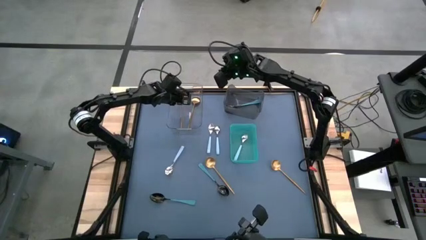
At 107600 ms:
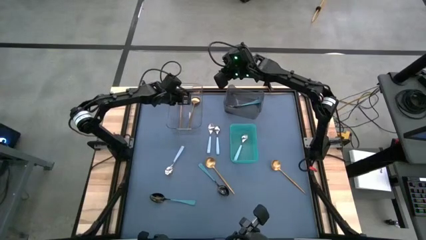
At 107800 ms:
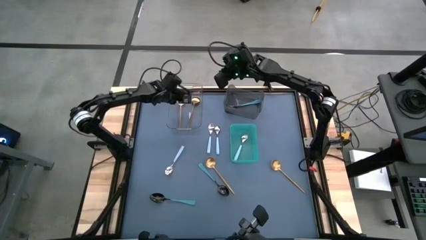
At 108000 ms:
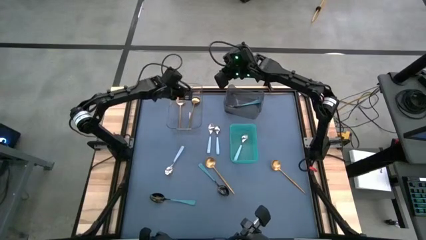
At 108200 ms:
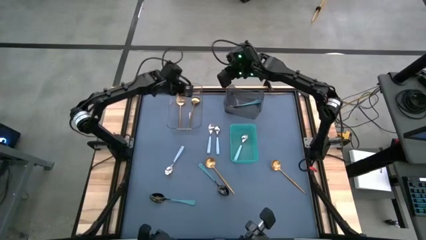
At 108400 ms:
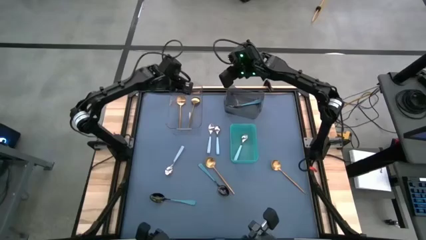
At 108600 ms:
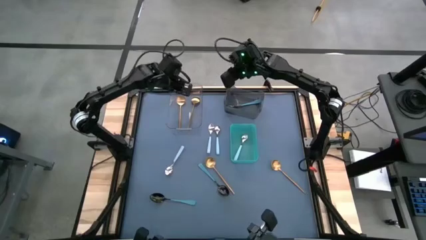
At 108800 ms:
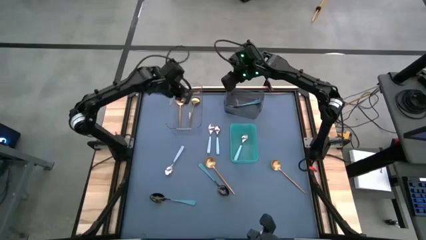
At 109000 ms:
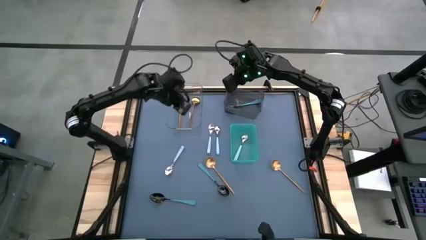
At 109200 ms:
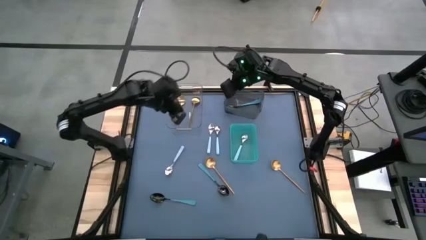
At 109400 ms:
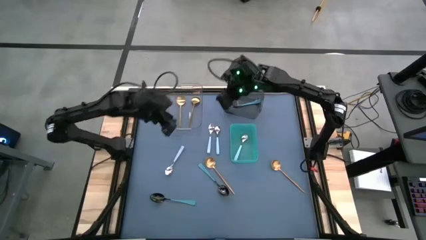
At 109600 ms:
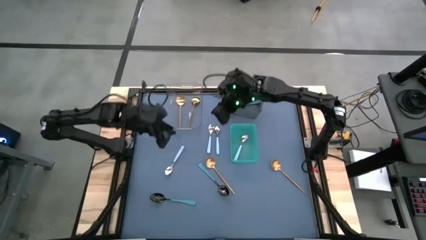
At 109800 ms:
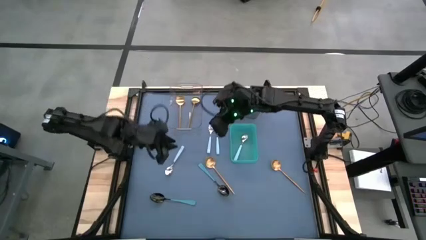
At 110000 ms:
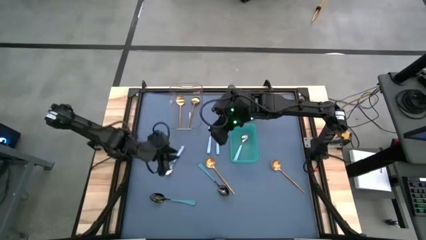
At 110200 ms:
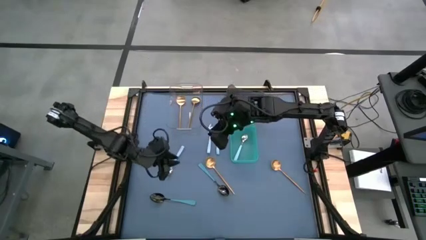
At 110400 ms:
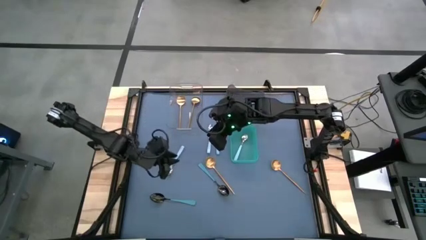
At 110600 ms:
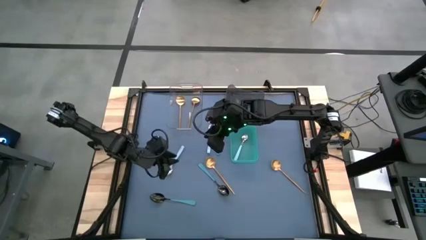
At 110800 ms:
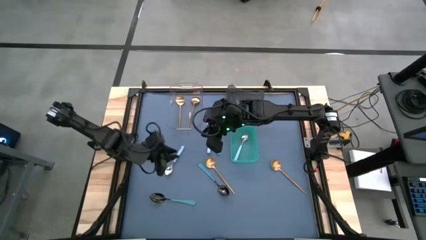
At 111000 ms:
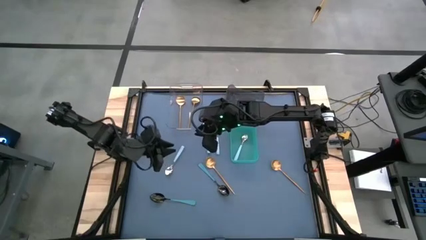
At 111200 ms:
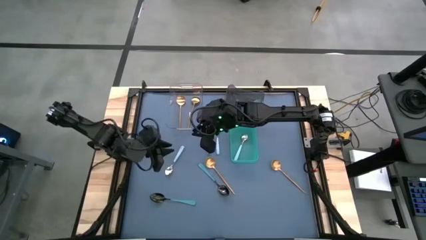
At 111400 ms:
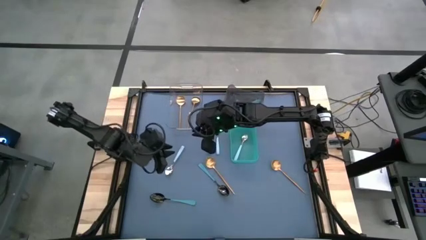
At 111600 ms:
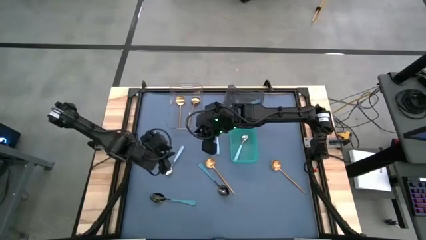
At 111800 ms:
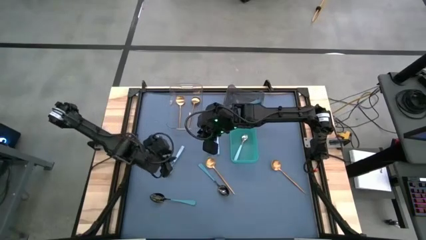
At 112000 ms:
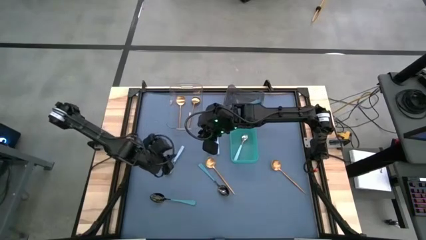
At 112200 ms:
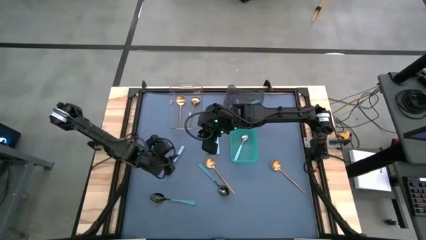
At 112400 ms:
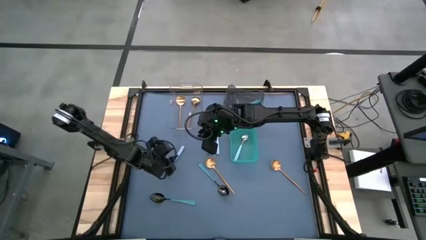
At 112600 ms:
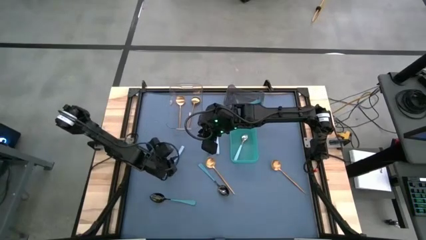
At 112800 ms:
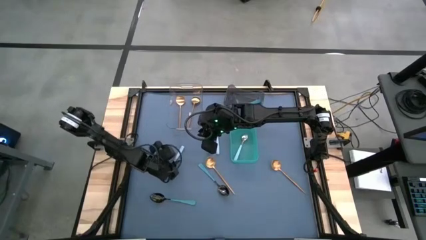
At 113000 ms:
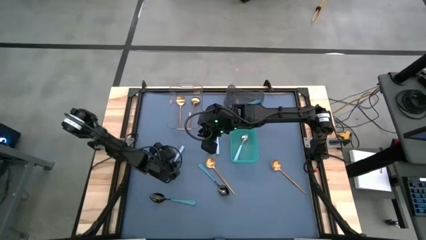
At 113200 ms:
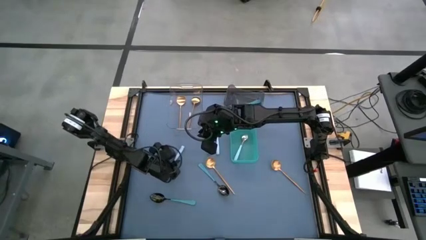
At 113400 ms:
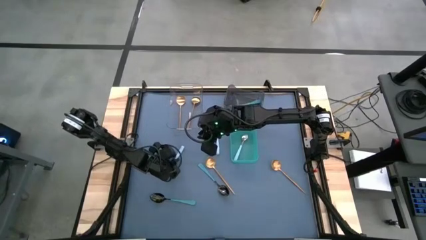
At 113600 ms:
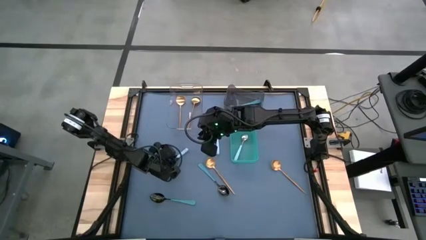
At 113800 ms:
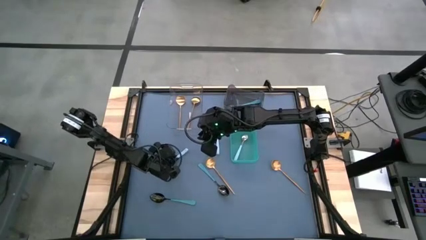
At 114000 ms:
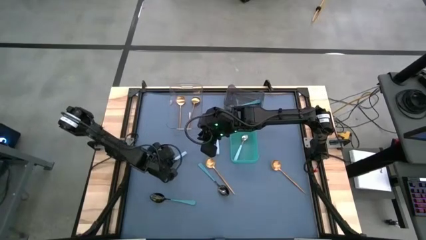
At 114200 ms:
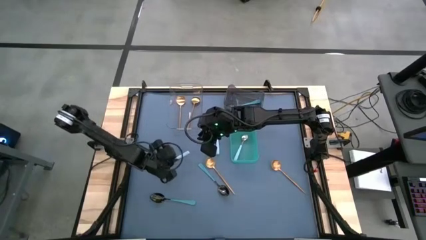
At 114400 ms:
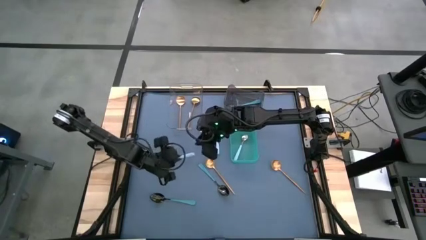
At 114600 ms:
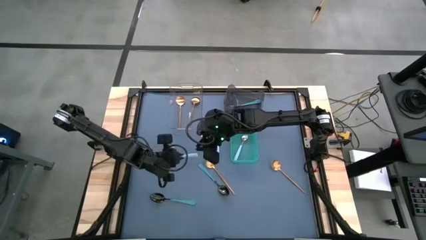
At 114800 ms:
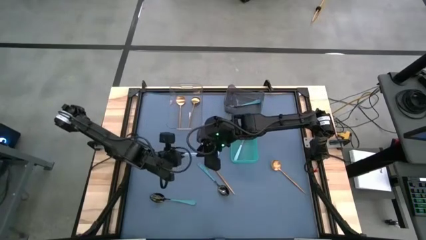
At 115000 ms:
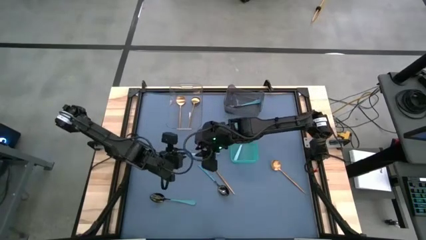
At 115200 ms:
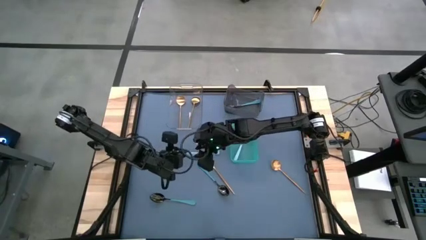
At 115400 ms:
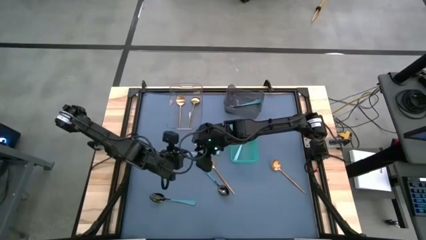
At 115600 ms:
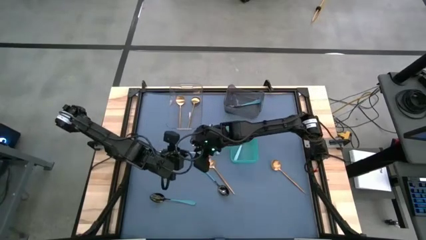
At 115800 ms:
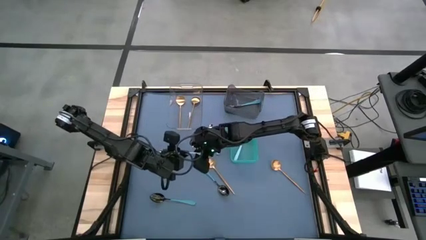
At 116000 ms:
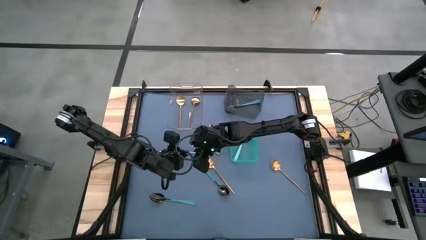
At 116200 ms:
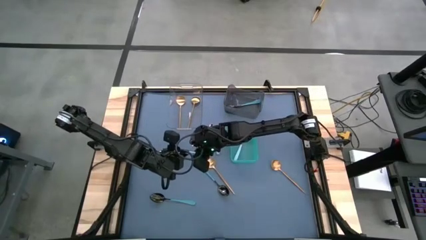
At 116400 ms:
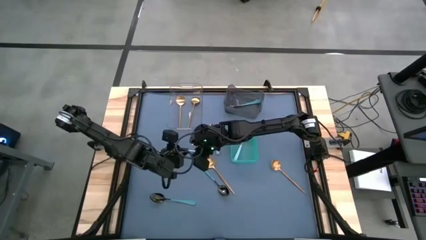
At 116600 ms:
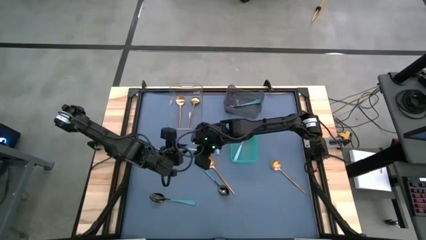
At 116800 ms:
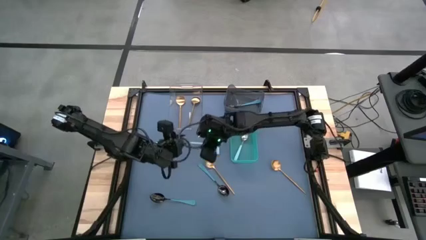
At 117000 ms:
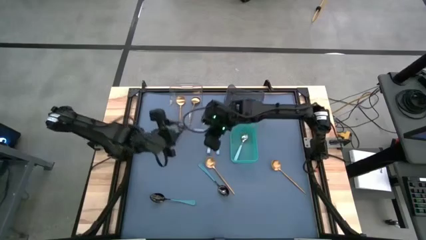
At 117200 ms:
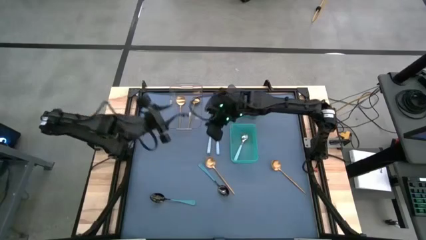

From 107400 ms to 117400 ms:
Task: Sort silverware by color (type)
Put the light blue spoon into the green bin
